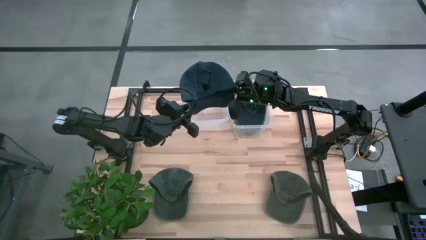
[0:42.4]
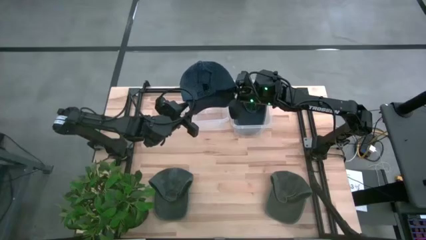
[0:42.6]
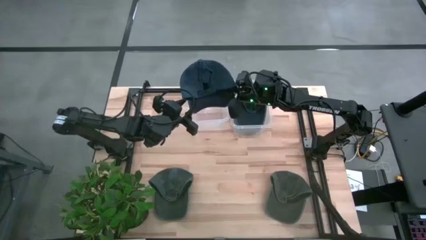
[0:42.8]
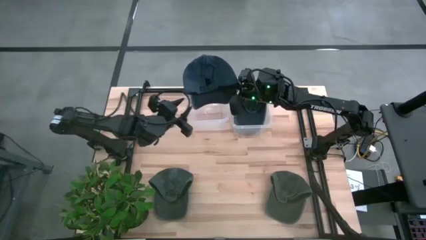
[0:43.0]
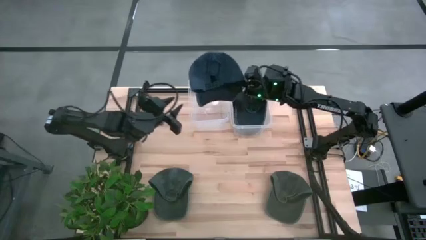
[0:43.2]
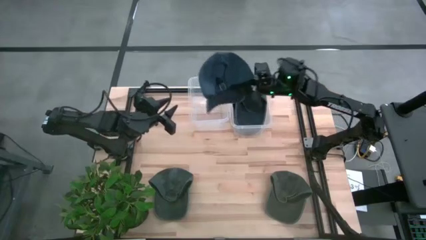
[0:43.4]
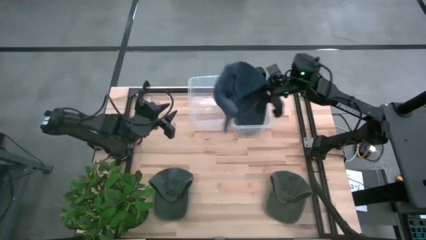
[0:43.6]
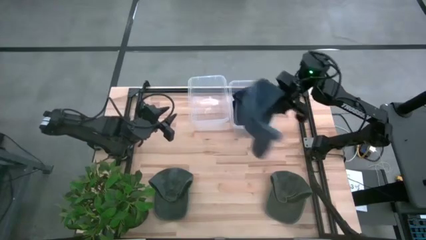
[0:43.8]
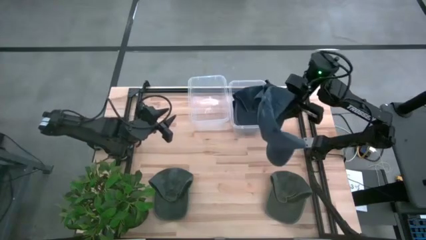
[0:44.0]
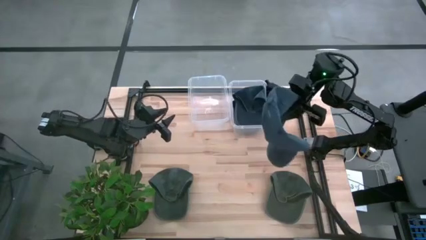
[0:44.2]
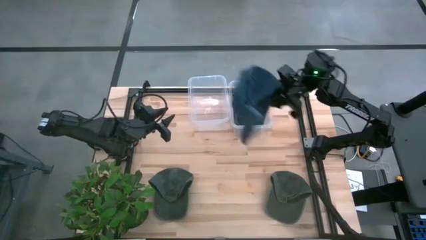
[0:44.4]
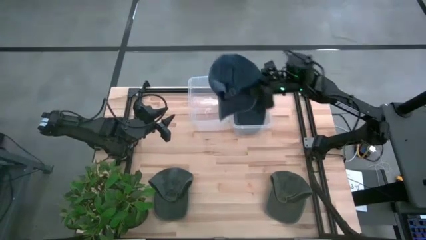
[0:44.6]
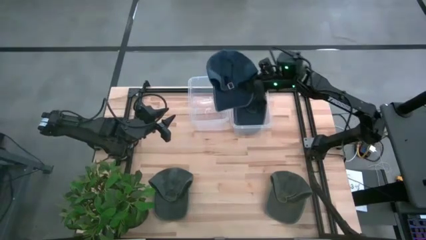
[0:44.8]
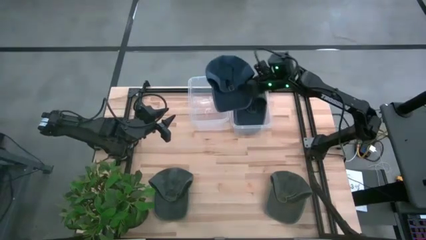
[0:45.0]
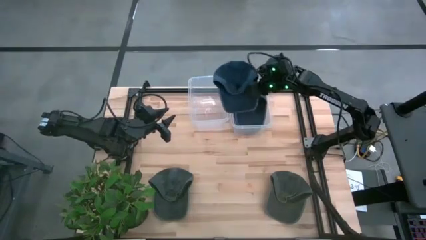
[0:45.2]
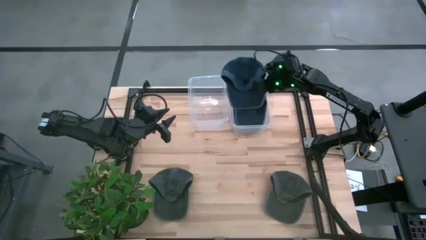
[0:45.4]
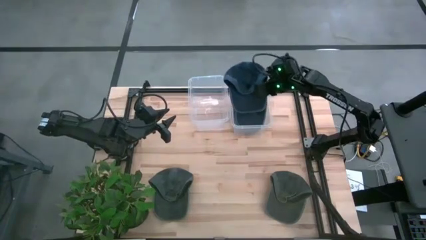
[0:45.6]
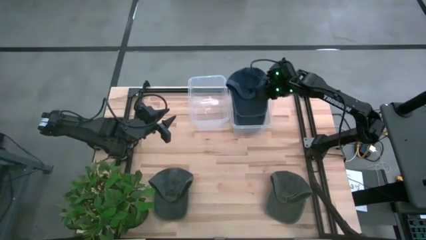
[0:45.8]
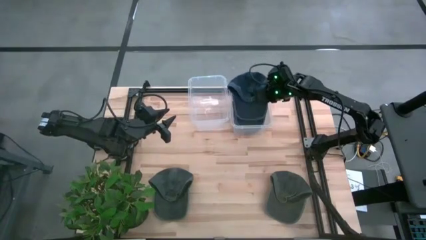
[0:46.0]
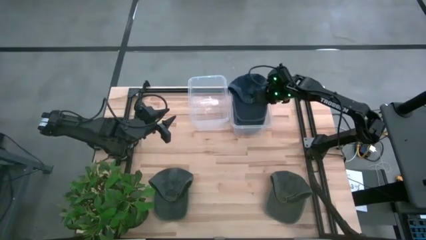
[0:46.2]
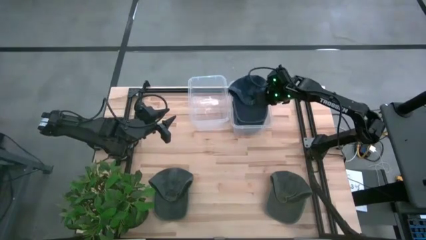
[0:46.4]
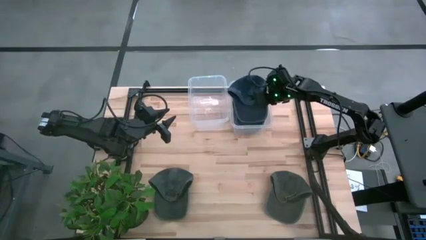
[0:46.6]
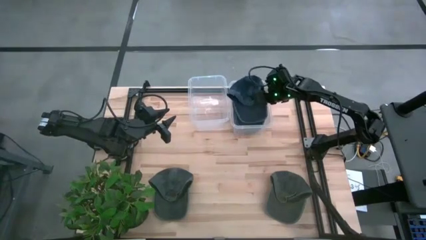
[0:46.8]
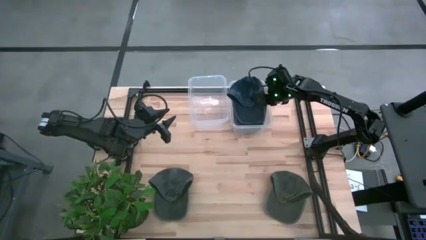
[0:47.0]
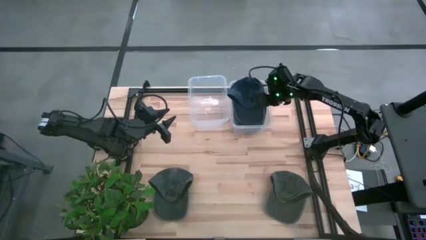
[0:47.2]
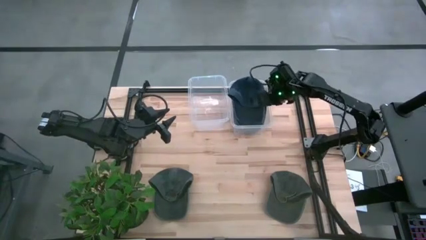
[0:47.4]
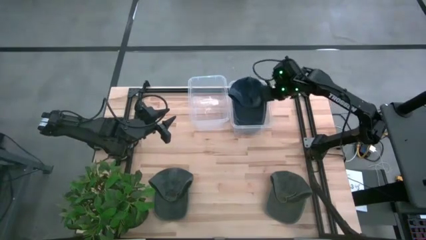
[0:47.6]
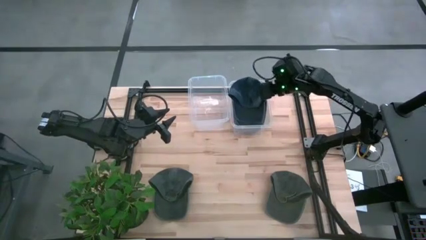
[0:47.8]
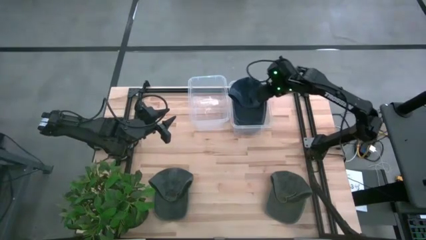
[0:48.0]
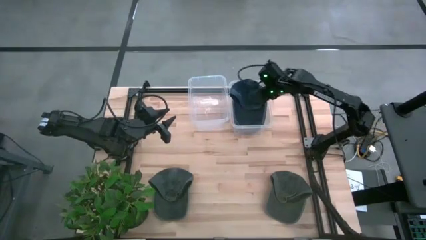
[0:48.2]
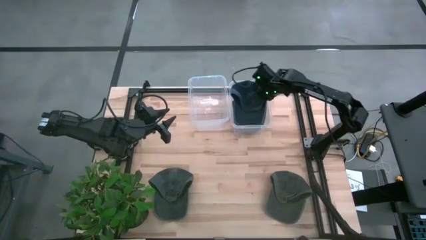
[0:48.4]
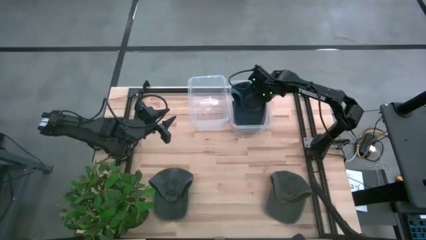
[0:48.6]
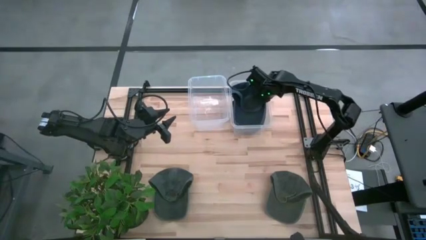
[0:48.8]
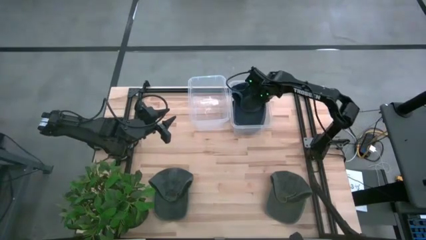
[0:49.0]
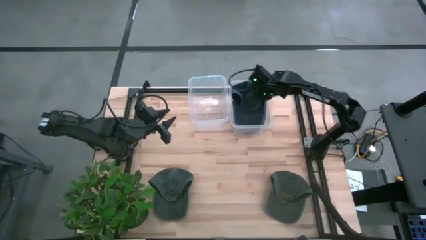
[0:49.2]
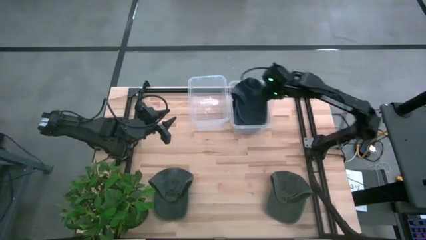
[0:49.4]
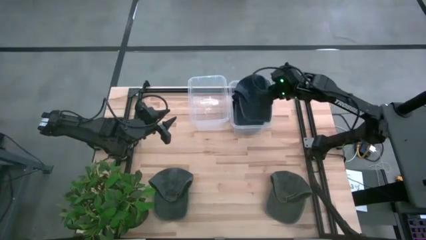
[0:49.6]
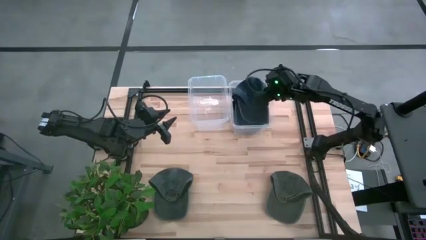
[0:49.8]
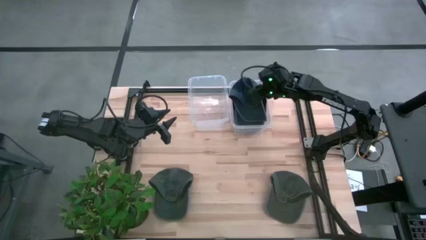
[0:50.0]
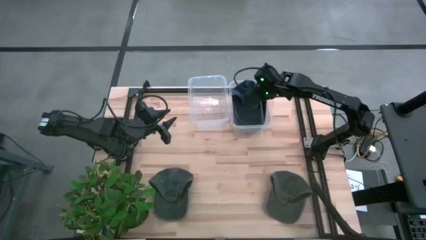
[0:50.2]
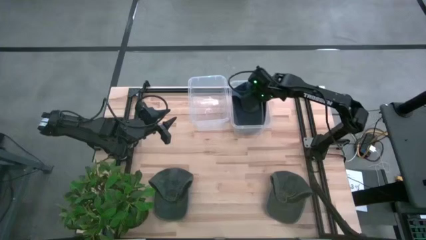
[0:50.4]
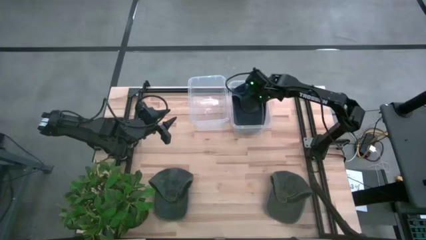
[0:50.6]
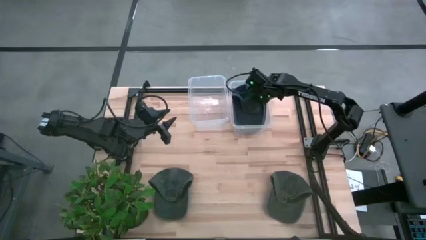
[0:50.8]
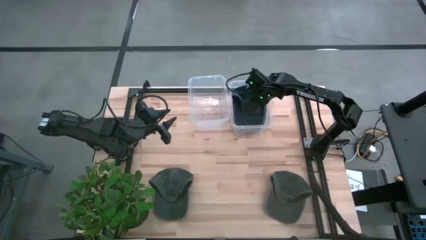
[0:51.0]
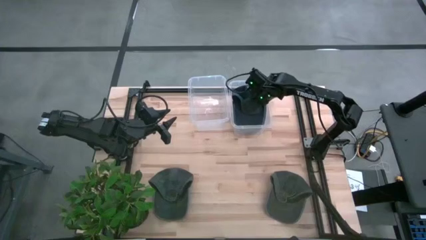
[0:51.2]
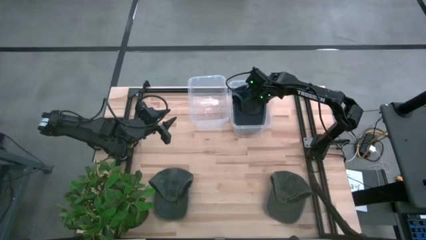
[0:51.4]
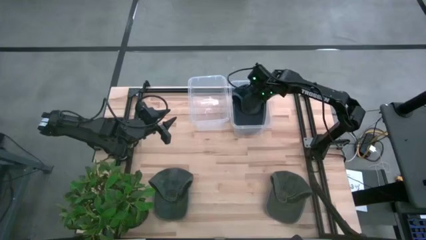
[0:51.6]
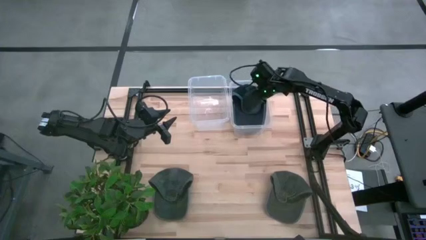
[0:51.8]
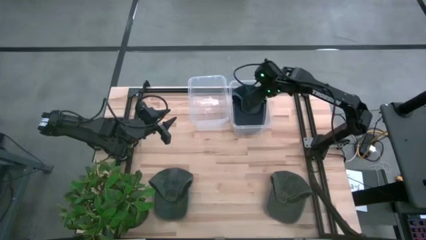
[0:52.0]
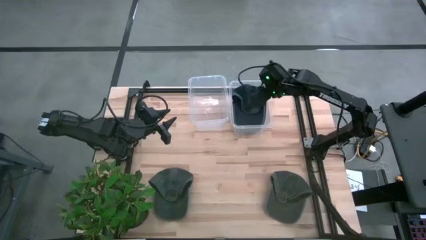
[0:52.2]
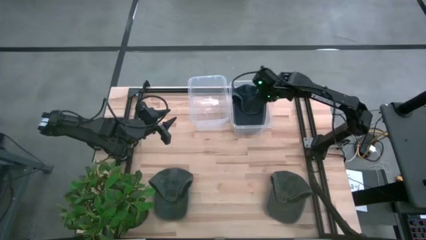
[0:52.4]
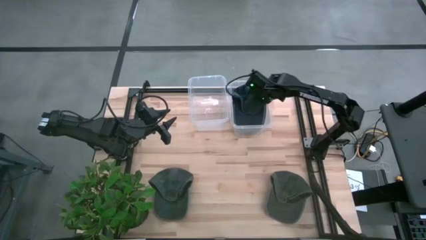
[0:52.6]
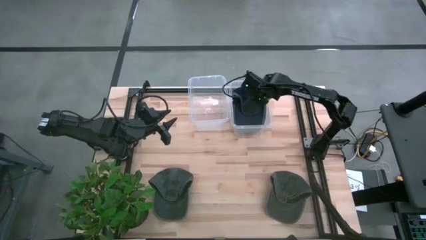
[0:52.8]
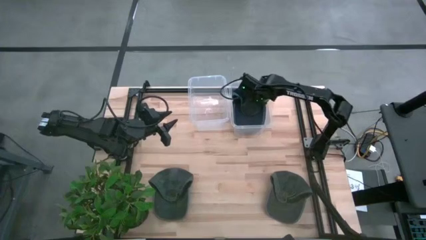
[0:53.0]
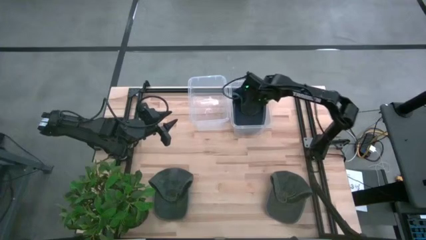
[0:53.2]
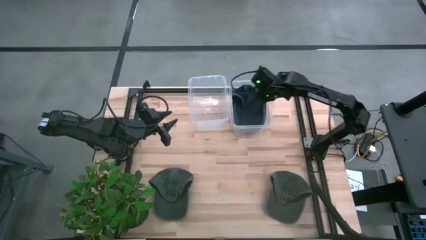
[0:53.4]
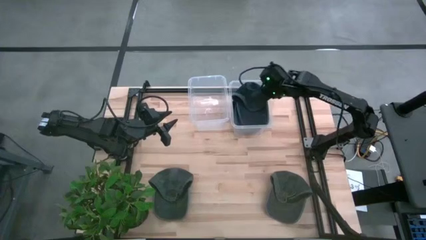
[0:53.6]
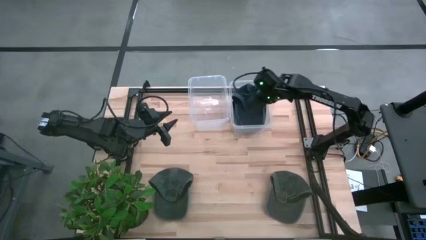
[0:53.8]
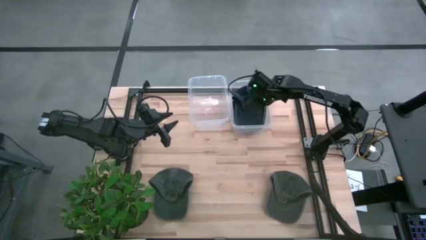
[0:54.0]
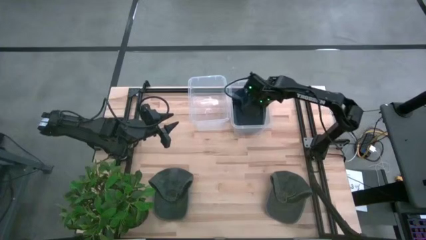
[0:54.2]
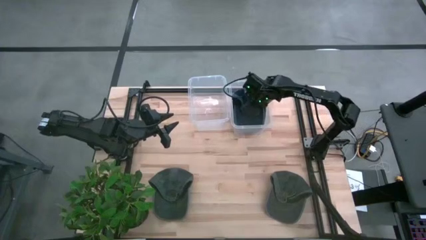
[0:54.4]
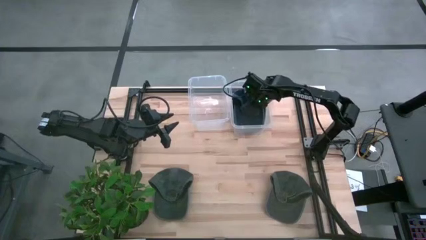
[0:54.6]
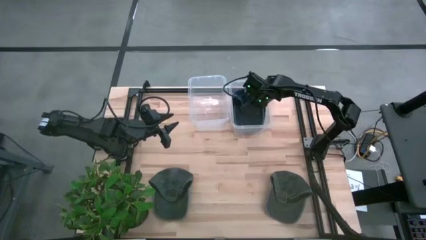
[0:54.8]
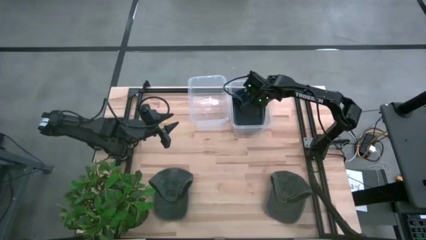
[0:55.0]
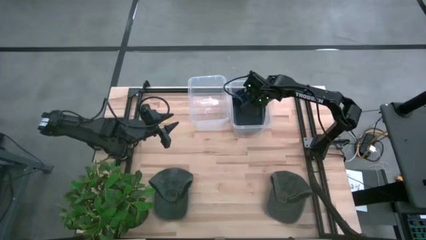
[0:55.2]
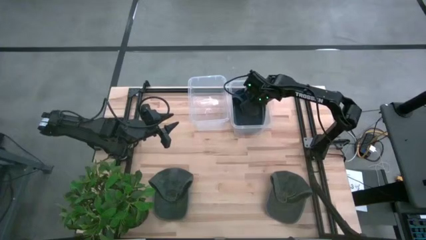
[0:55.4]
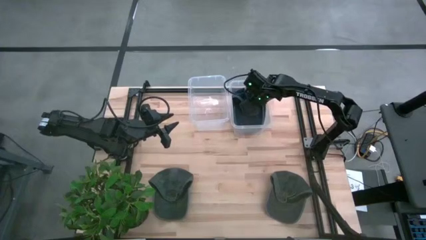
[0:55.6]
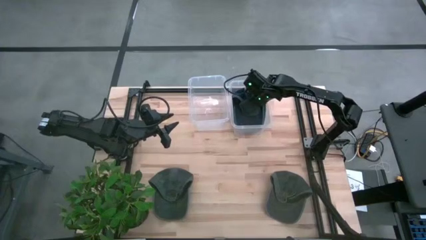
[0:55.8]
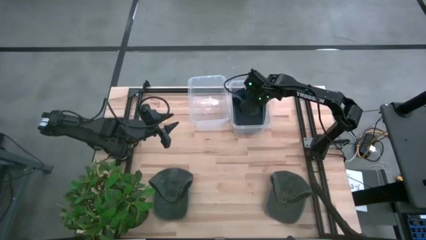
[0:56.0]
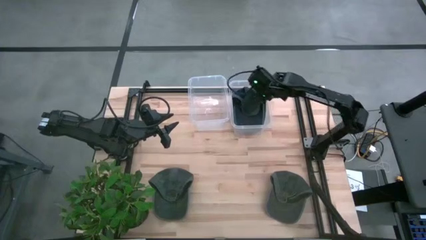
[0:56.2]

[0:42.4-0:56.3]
Task: Pick & Place hat
Put the blue cap into the right transparent bin
